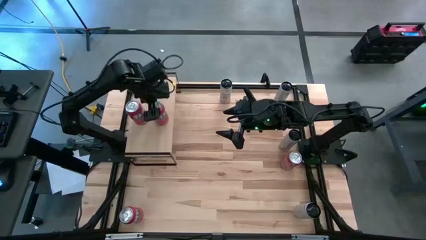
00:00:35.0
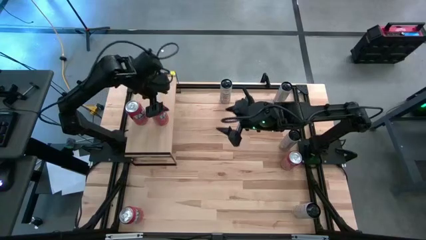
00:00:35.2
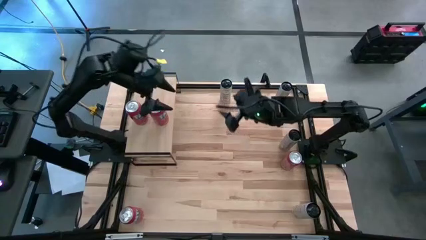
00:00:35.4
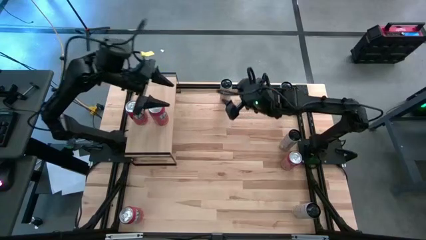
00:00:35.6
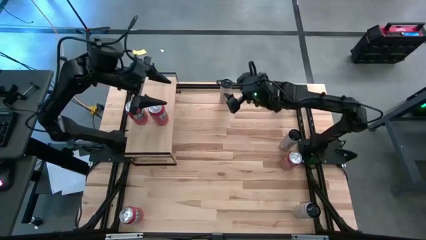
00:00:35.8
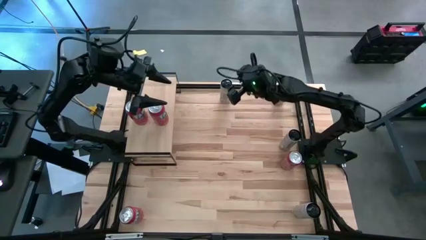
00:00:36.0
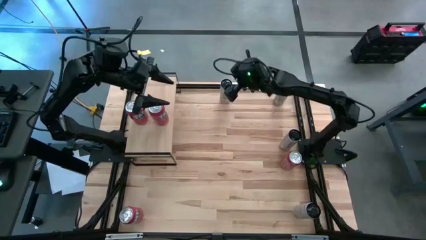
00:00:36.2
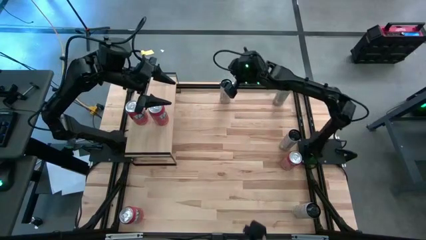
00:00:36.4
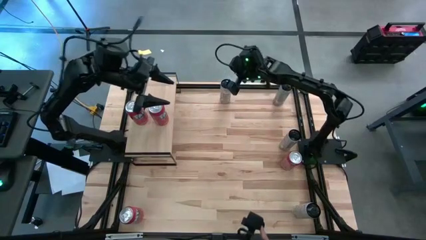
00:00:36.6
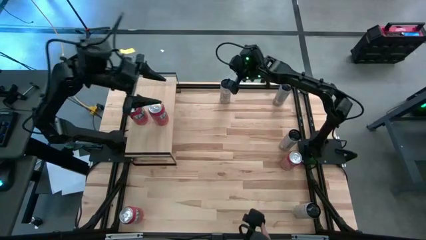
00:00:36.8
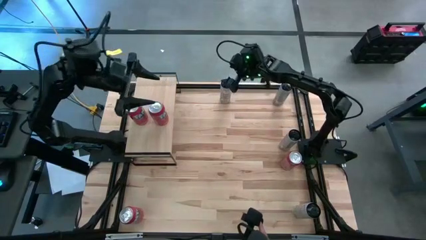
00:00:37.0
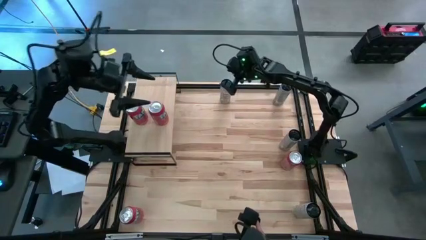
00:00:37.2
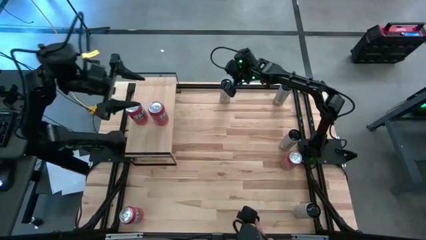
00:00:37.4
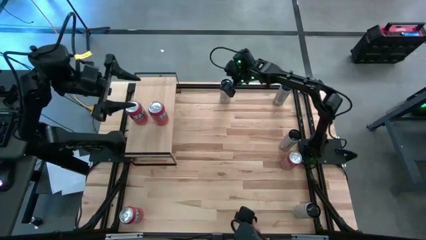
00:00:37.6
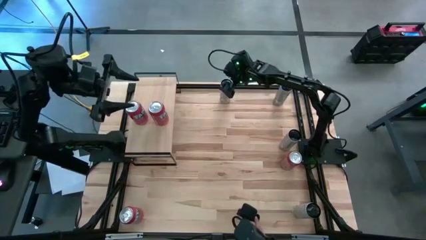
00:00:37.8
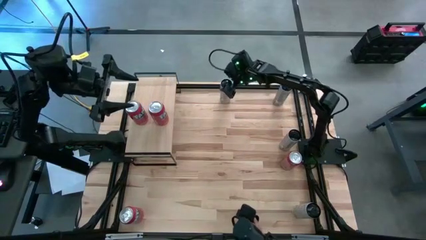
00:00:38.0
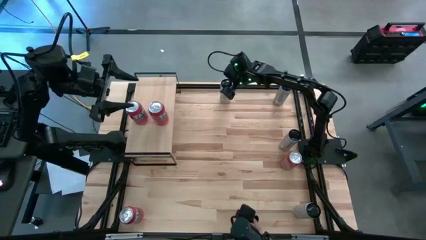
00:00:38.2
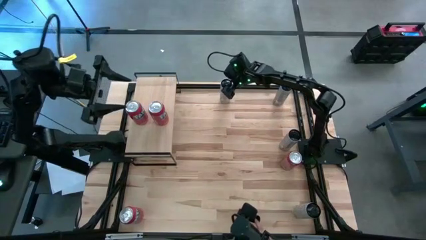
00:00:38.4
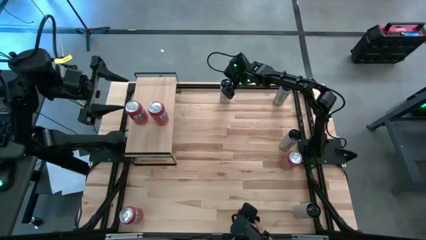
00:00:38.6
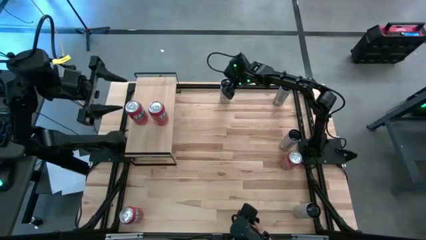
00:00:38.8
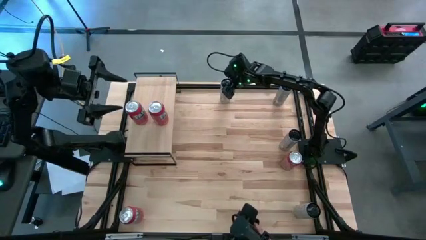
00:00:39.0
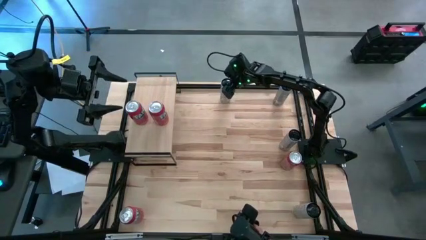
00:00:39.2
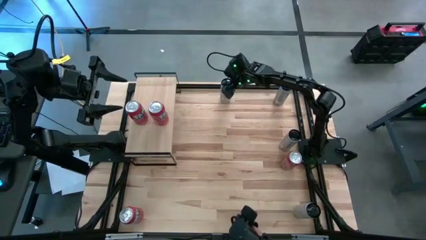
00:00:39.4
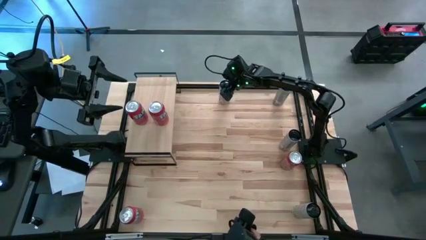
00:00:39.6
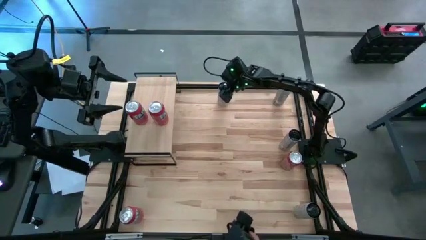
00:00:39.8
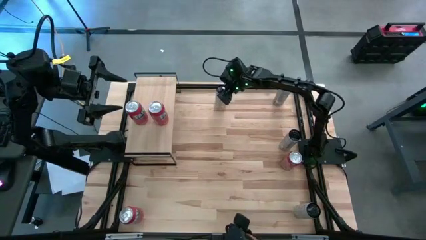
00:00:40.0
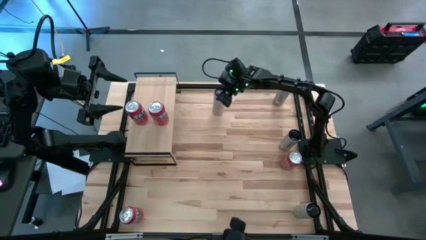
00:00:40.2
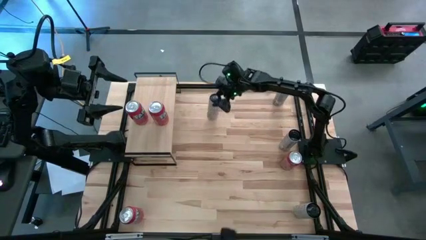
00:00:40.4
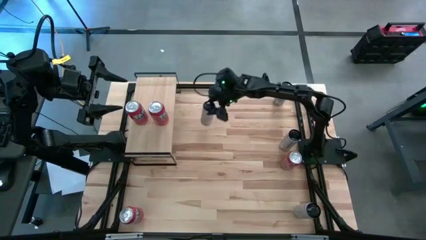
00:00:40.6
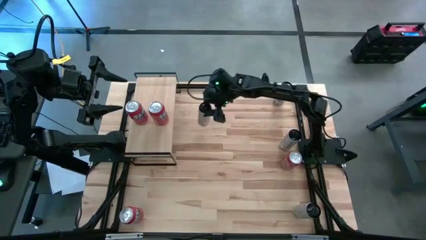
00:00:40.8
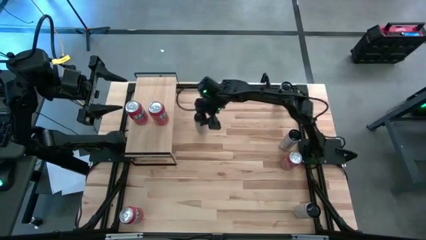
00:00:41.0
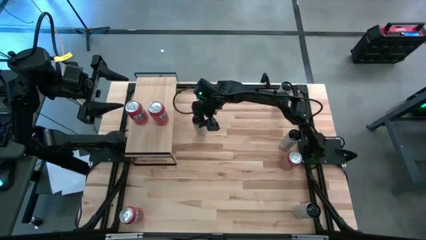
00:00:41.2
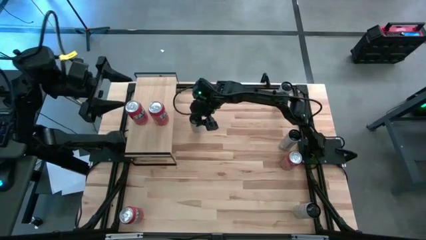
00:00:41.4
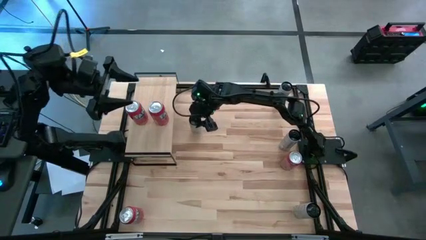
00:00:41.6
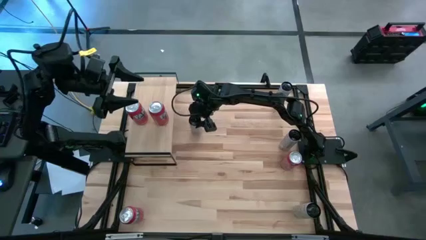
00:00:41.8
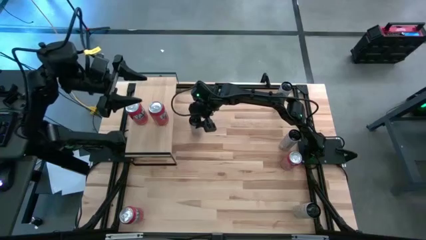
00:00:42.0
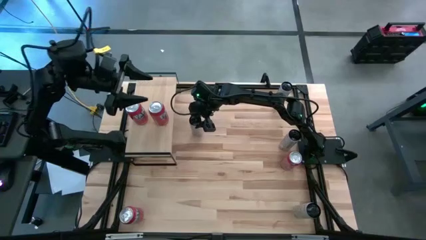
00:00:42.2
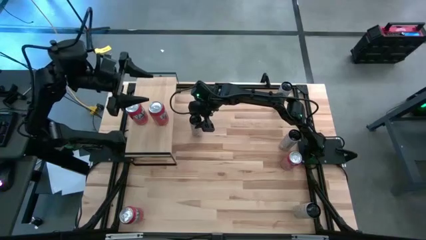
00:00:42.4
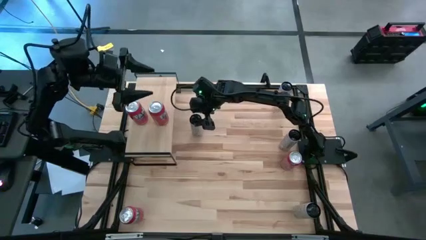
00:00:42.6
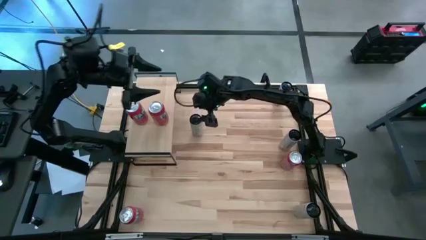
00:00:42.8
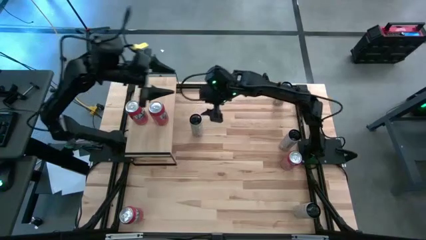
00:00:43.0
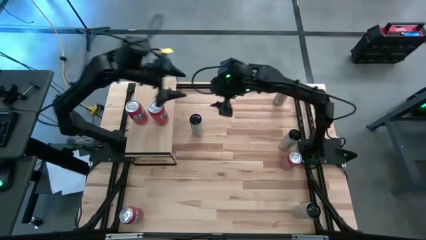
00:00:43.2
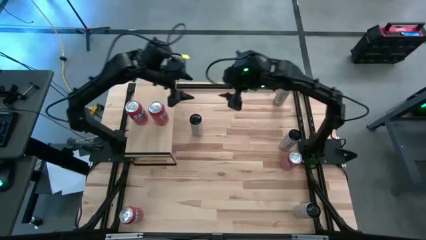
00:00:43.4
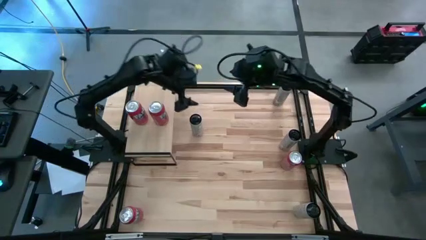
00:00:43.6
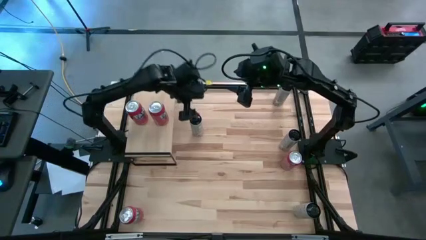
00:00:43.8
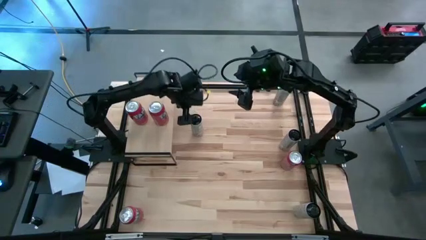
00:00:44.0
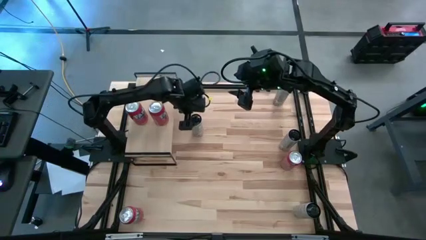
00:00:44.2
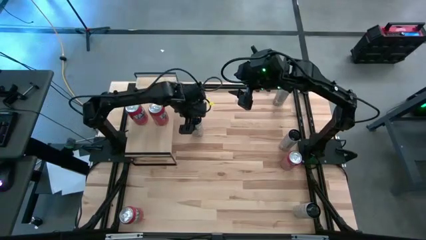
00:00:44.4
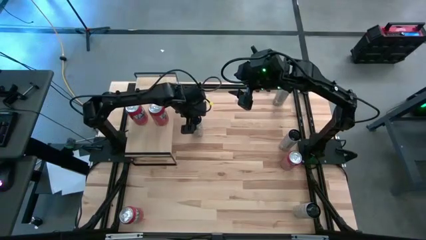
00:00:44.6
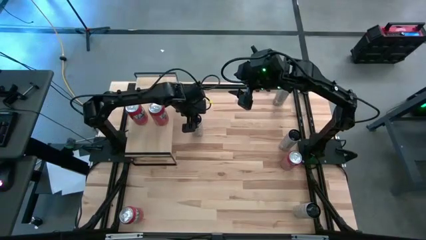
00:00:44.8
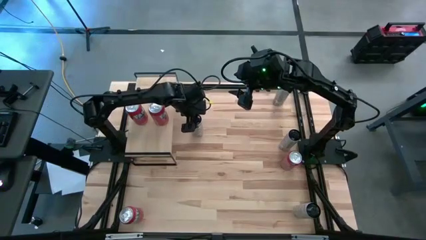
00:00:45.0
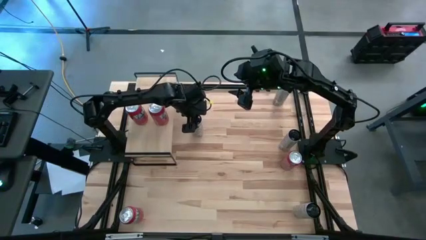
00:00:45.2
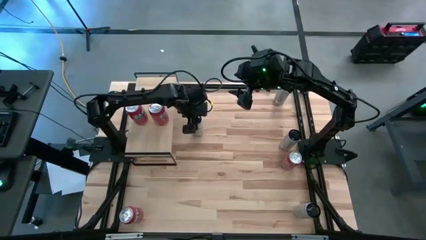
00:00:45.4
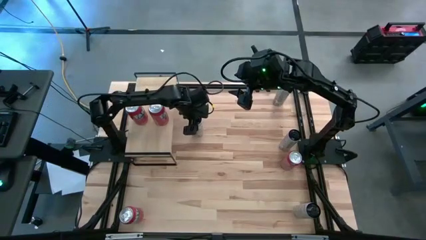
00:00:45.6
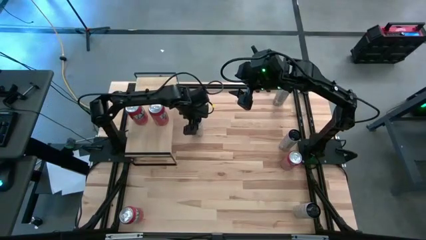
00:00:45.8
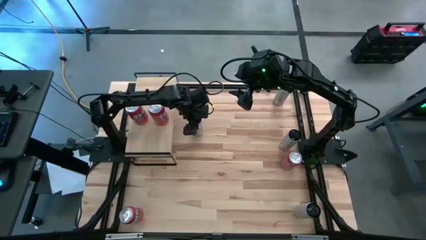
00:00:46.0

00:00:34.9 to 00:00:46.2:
Task: Place canned beverage on shelf
Put the top left white yellow soda can on the shelf
